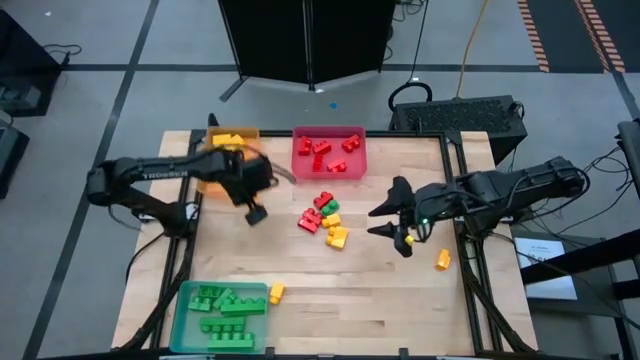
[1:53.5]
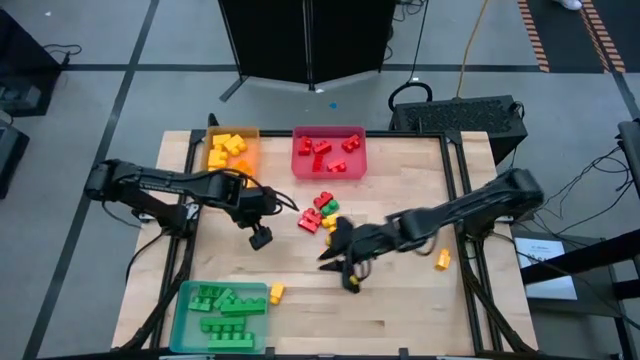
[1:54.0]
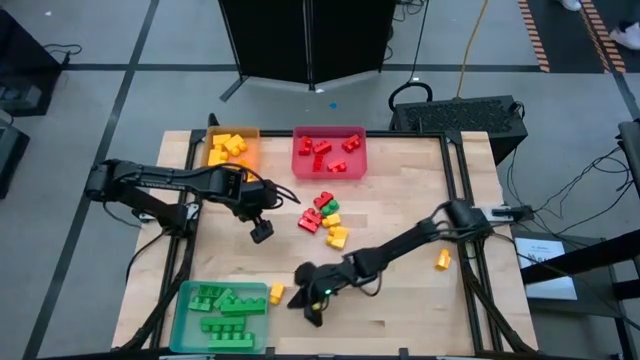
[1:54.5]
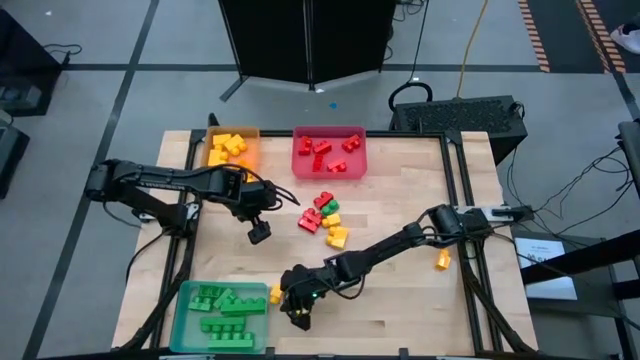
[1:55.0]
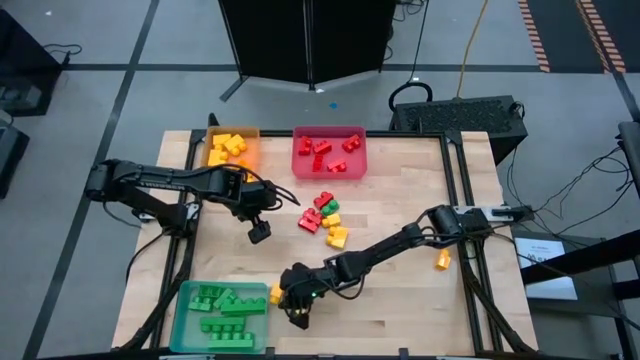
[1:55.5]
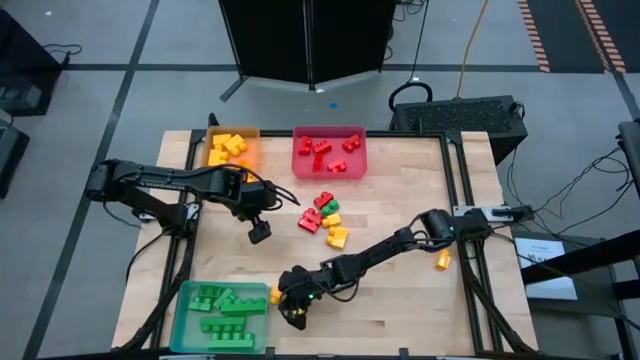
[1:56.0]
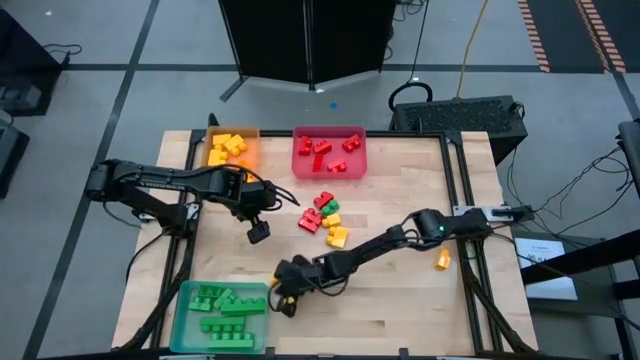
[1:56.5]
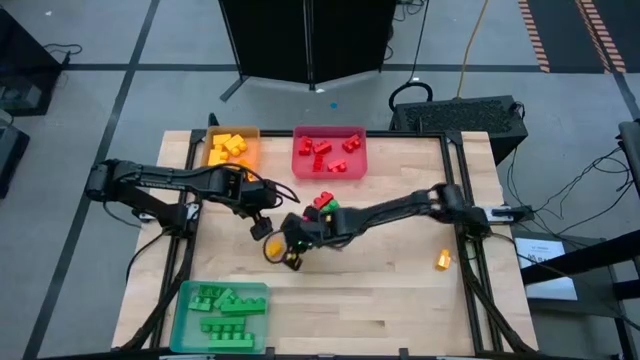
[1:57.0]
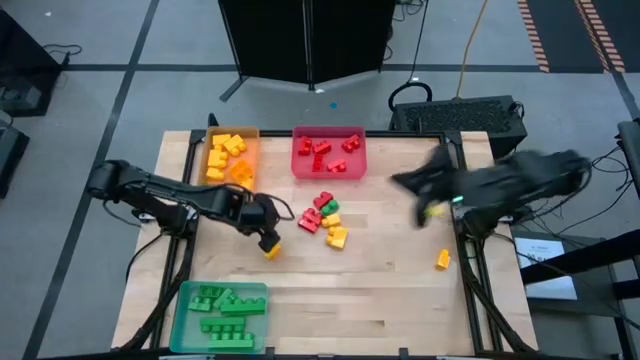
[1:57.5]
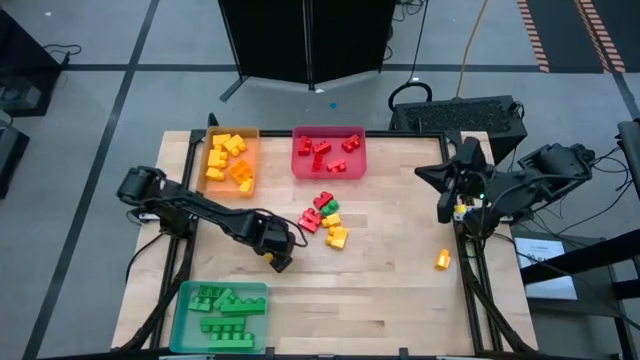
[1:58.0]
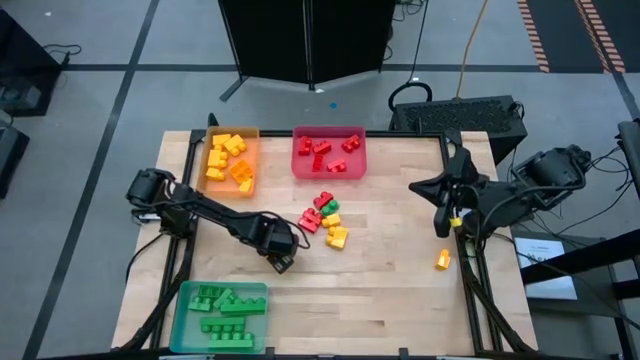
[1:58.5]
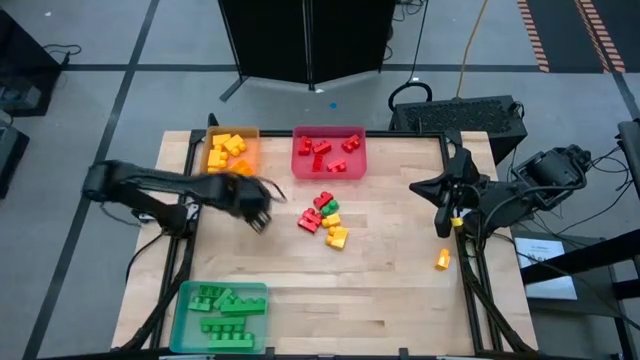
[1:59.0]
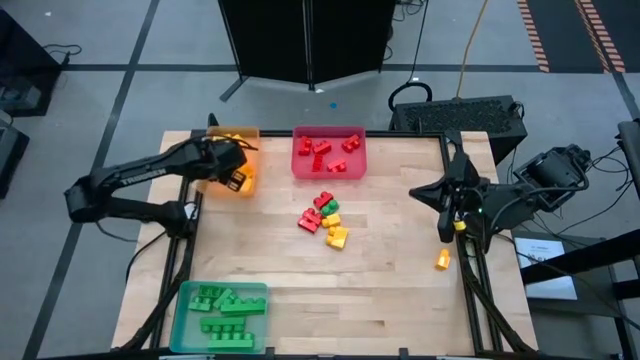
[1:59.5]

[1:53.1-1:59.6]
Task: Sort blocks
Put the yellow game piece into the yellow bin

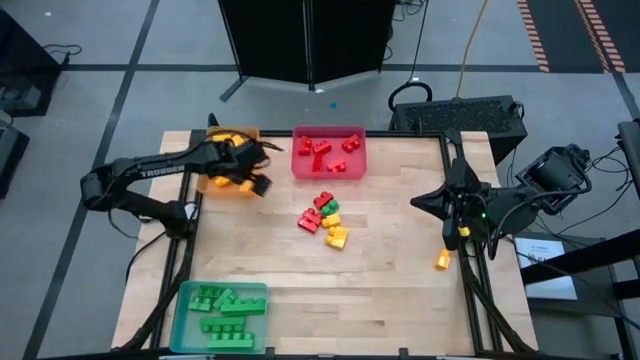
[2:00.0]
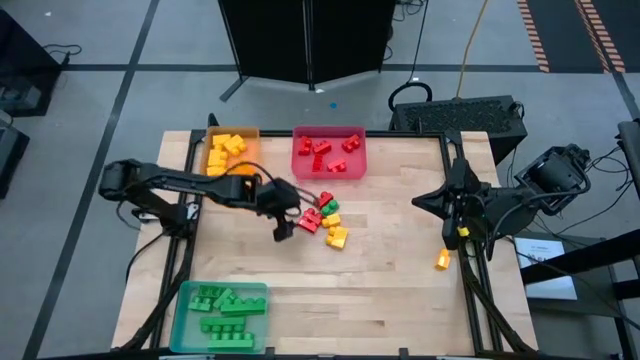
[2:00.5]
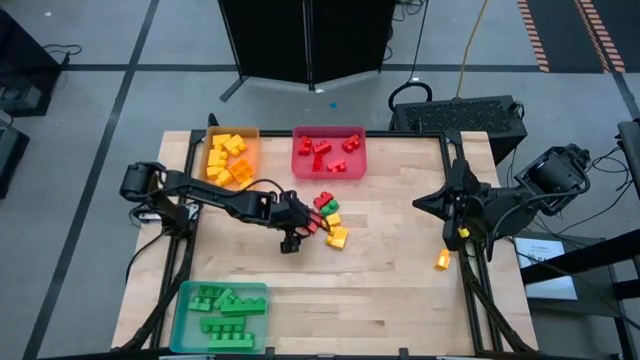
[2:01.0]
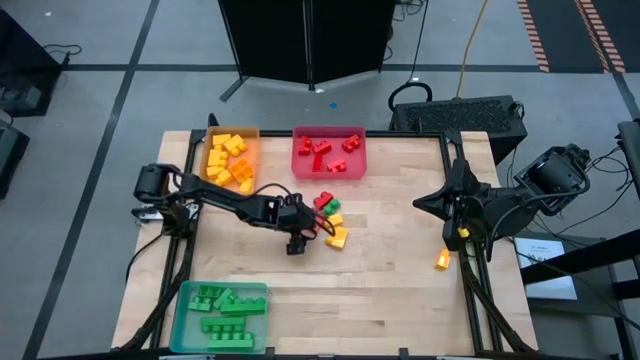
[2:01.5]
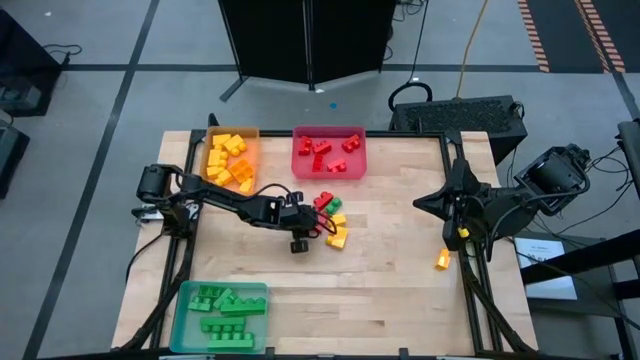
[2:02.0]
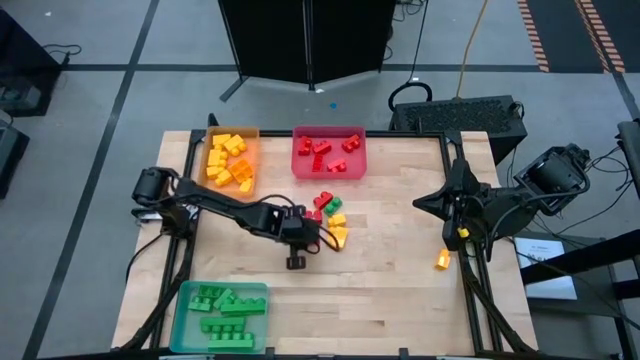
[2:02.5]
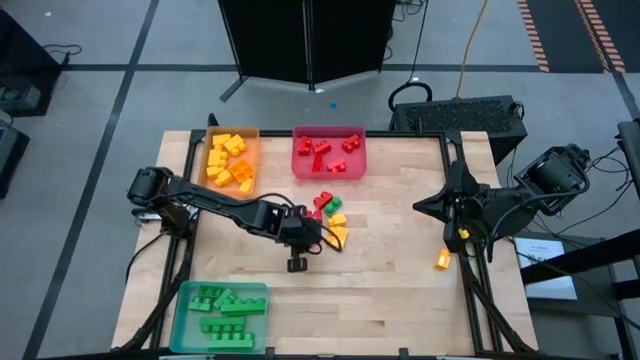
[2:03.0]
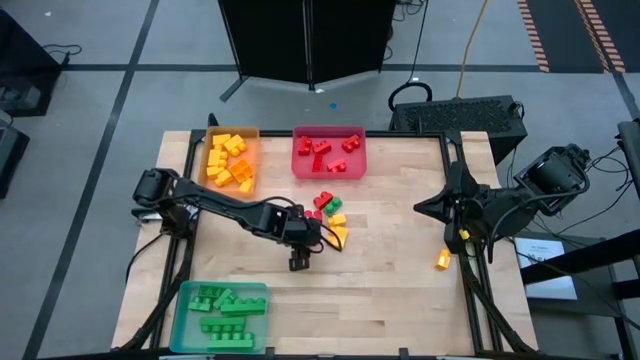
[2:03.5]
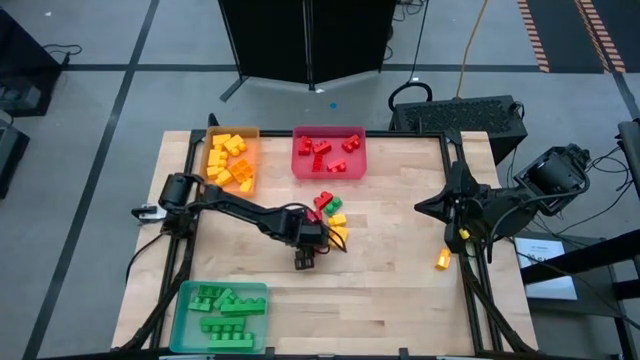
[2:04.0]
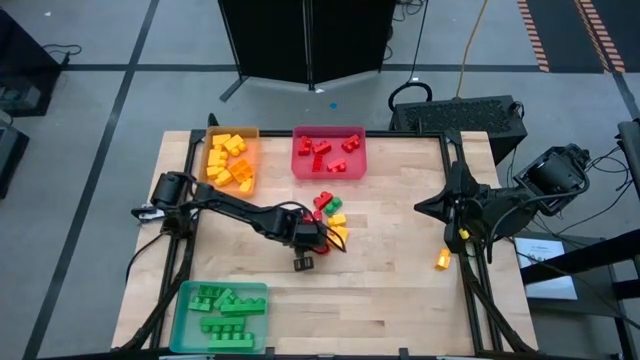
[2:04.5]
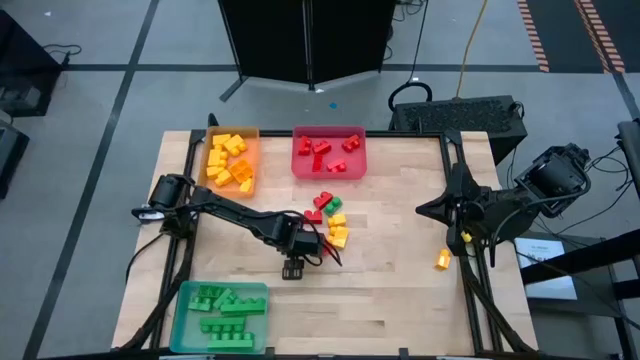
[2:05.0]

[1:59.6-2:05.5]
Put the red game piece into the red bin

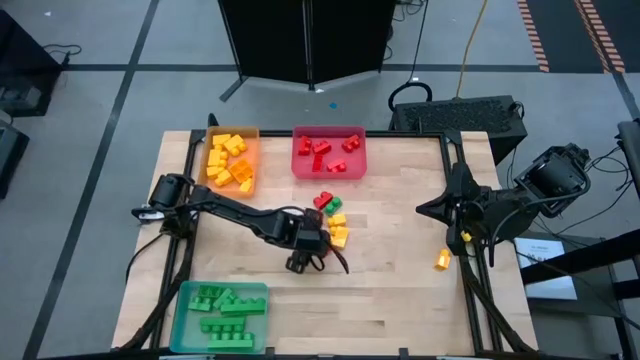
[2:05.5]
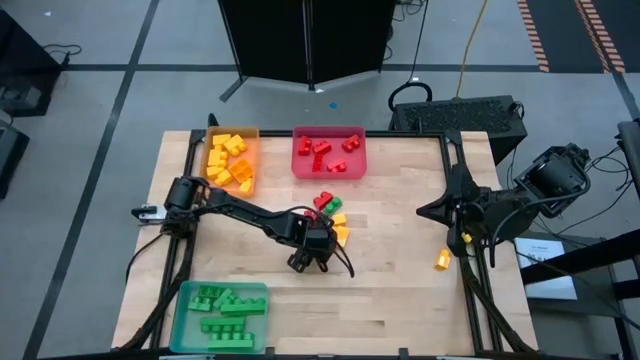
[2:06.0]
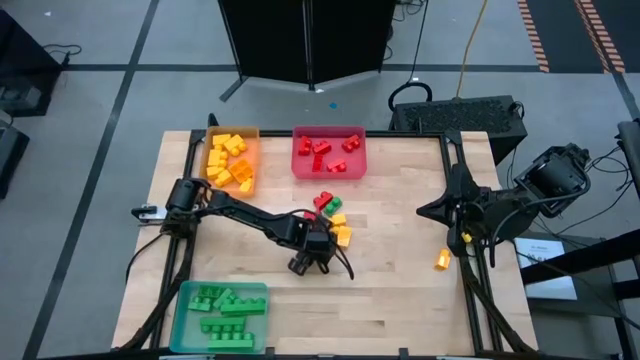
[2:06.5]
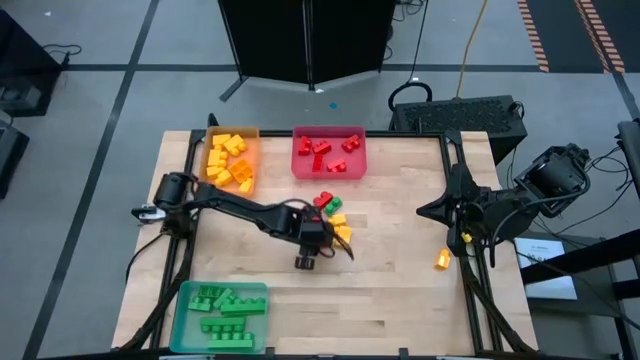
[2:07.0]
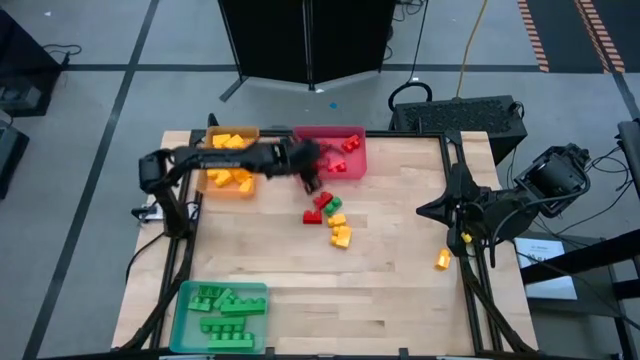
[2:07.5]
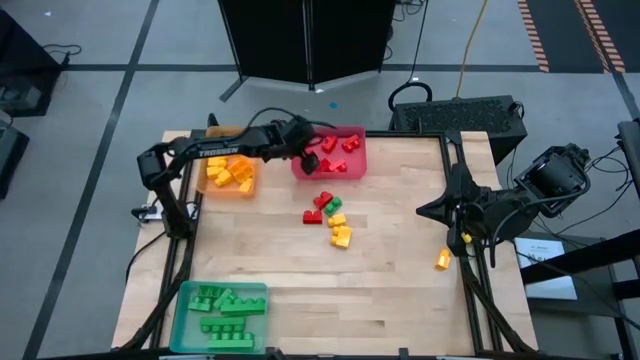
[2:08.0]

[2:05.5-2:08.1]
Put the red game piece into the red bin

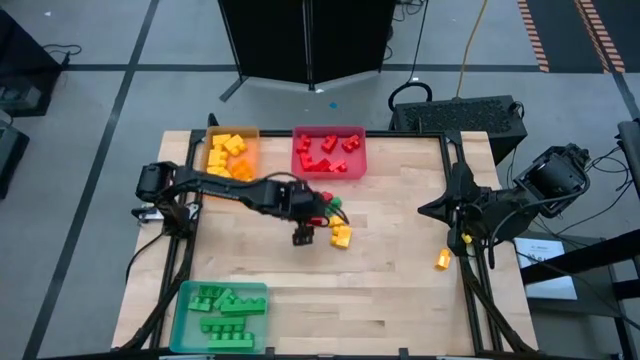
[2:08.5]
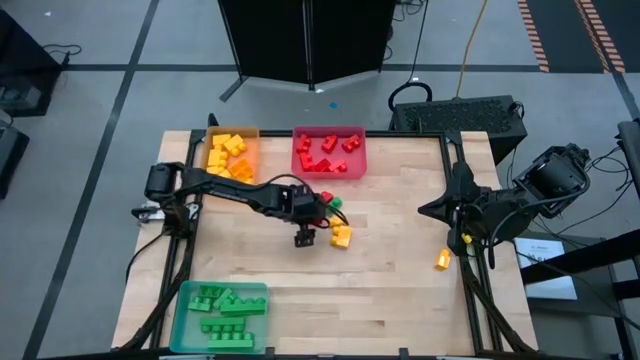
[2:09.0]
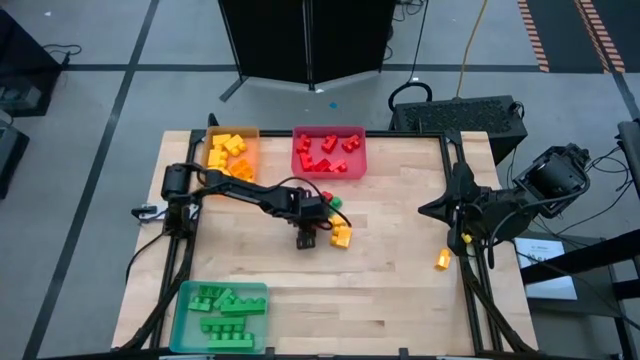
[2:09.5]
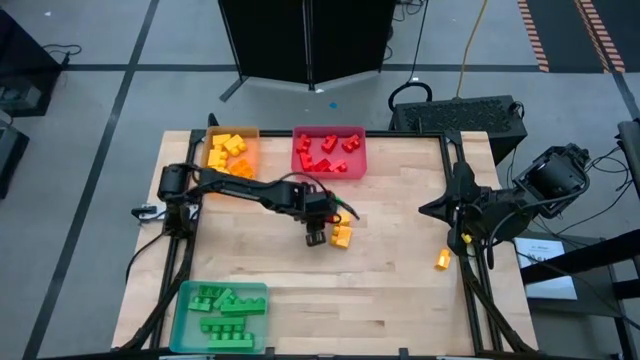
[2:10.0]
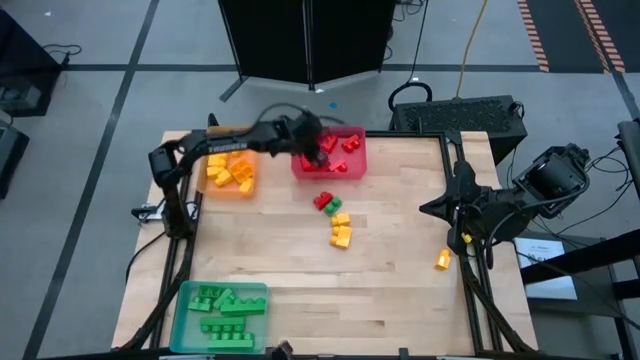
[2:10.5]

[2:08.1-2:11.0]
Put the red game piece into the red bin

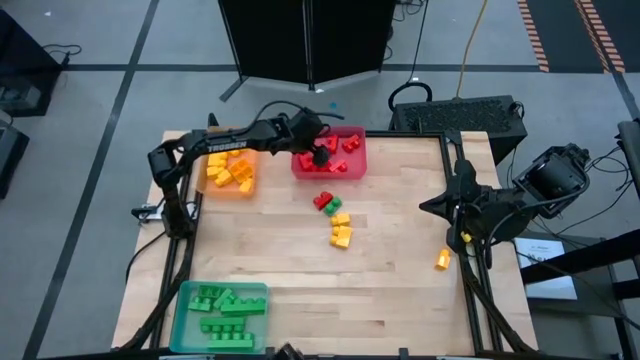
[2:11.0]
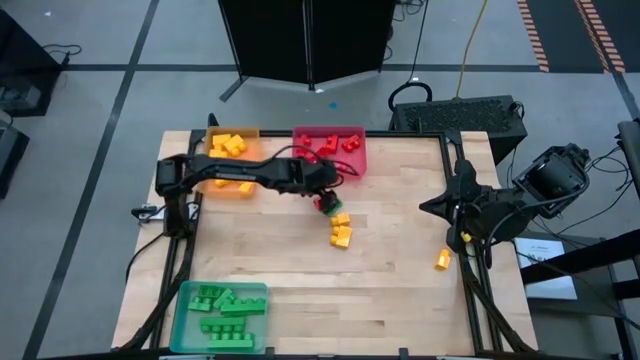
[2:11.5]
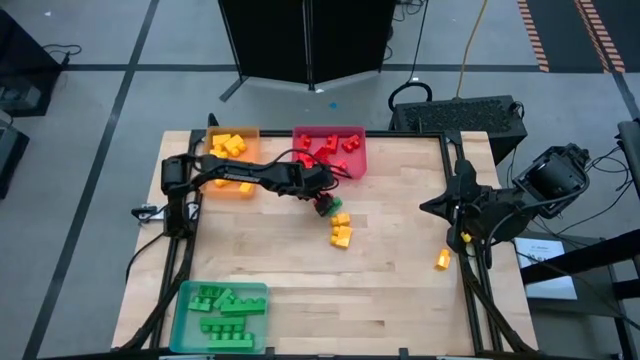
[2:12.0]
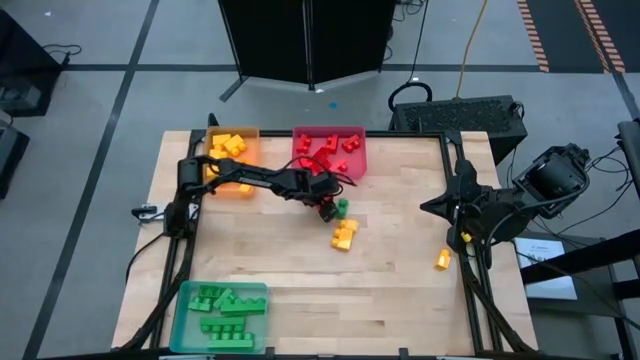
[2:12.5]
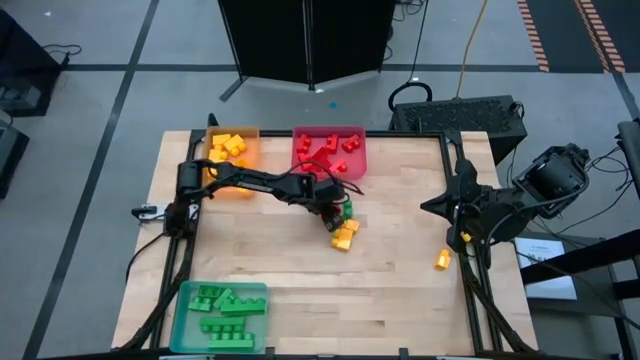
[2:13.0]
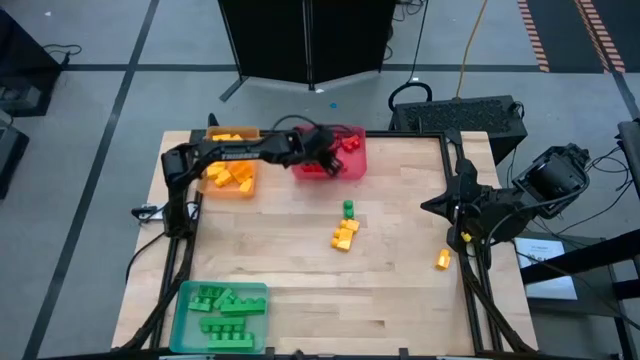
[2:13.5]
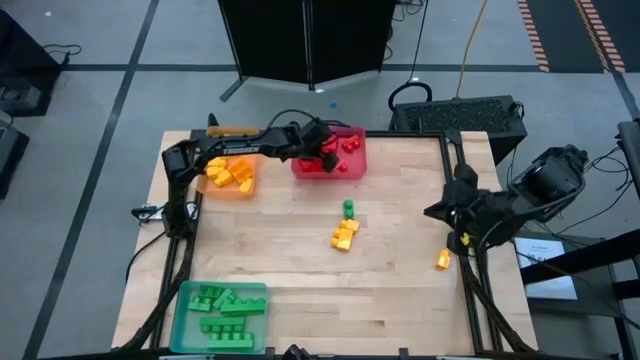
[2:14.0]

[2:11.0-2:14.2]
Put the red game piece into the red bin
